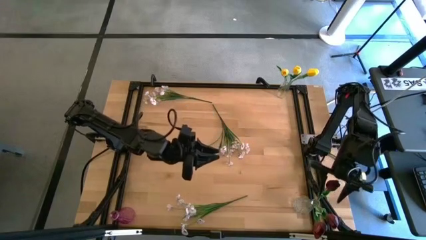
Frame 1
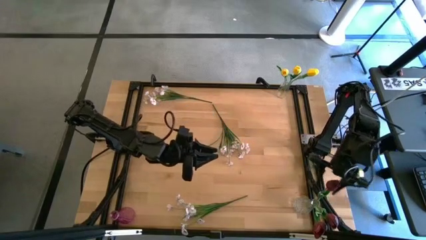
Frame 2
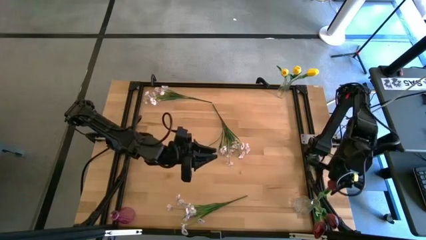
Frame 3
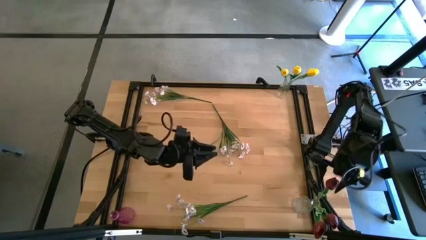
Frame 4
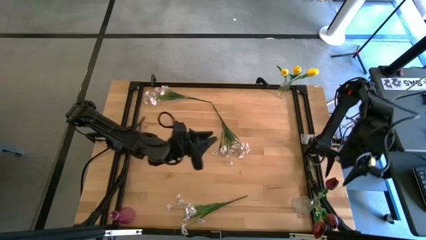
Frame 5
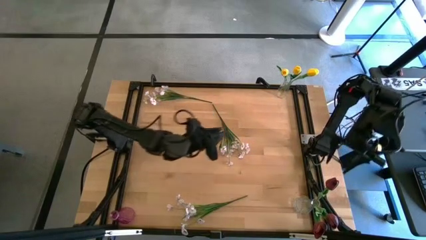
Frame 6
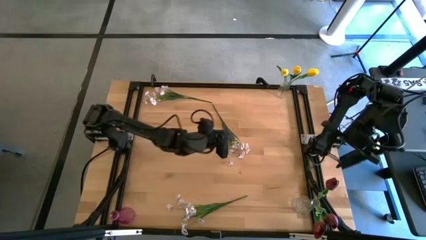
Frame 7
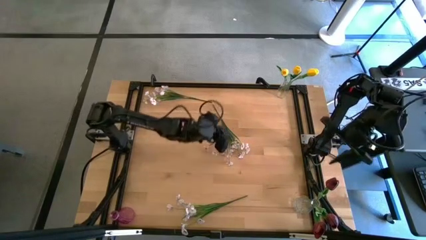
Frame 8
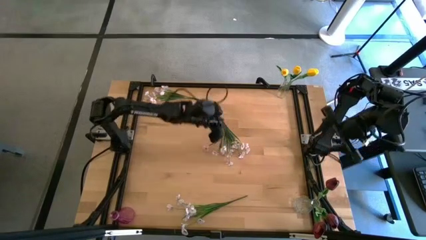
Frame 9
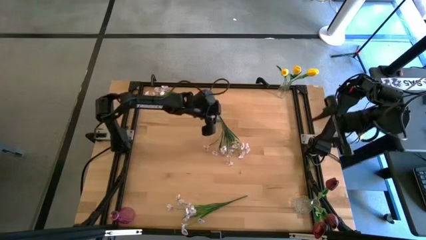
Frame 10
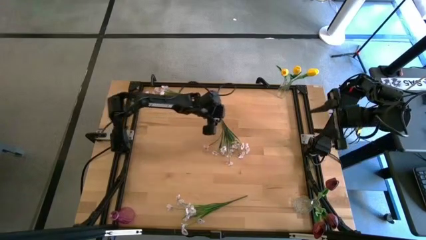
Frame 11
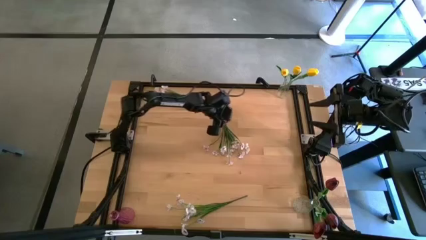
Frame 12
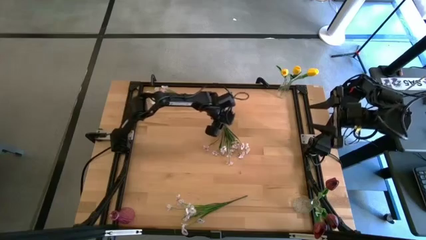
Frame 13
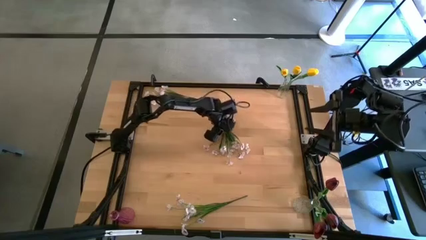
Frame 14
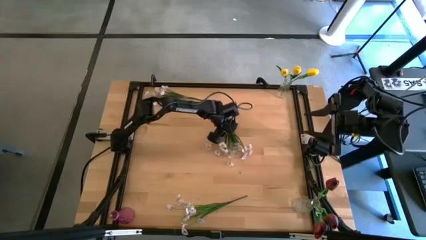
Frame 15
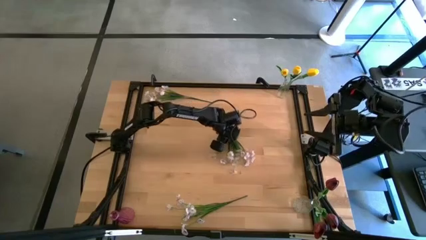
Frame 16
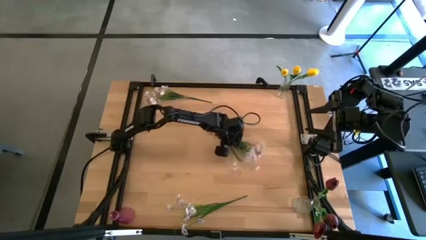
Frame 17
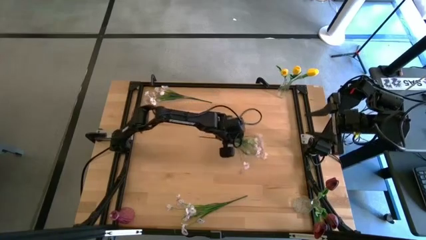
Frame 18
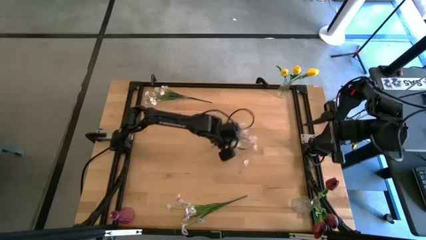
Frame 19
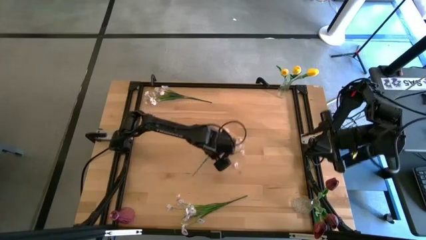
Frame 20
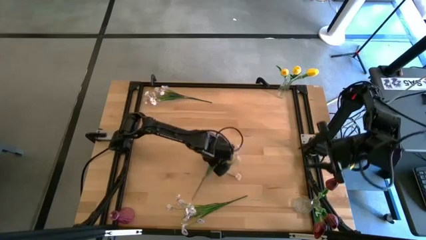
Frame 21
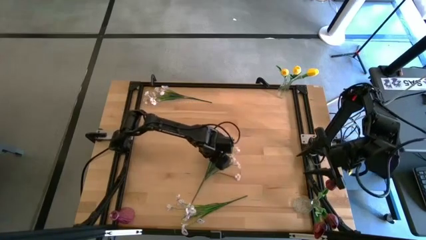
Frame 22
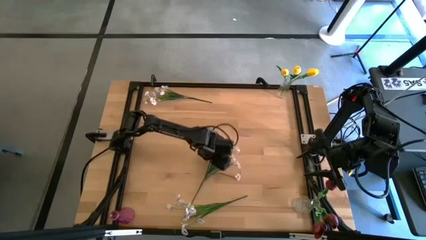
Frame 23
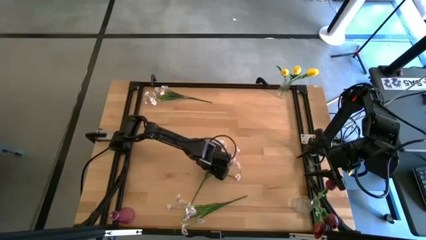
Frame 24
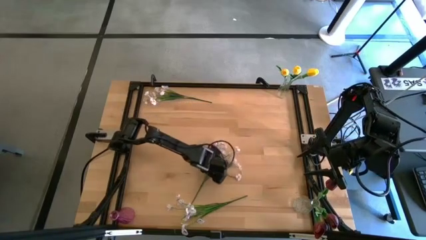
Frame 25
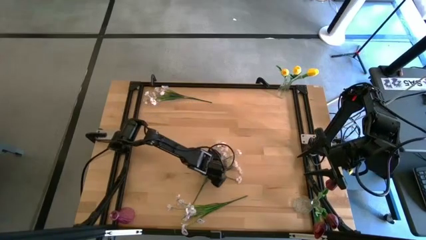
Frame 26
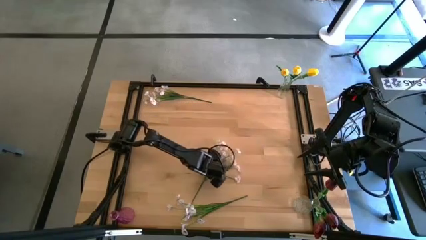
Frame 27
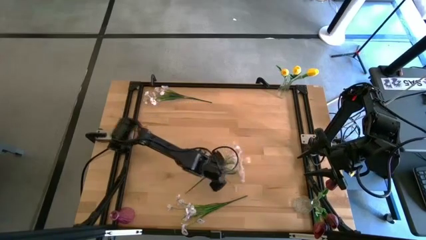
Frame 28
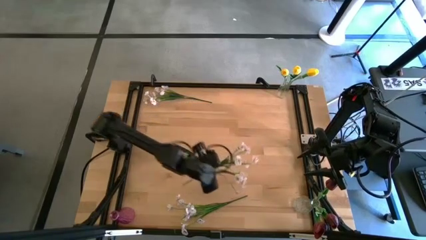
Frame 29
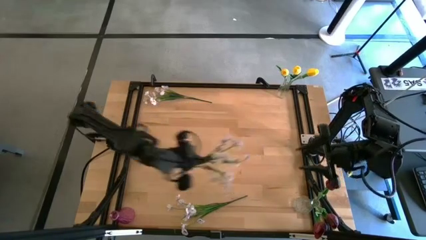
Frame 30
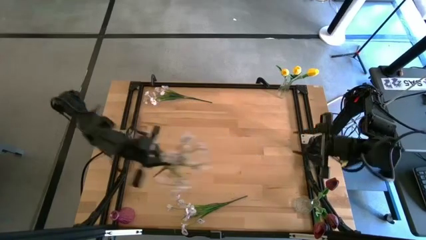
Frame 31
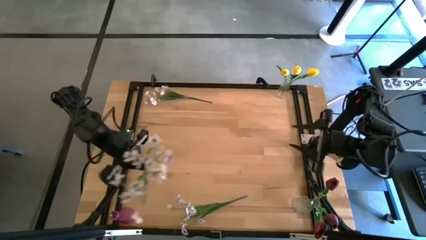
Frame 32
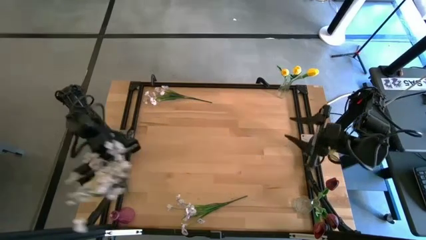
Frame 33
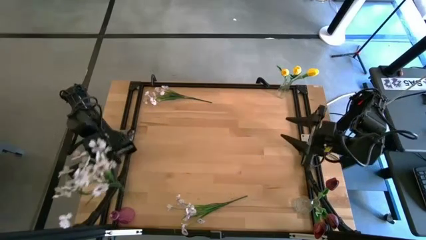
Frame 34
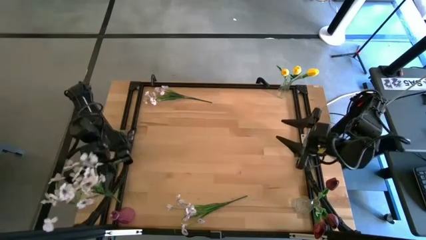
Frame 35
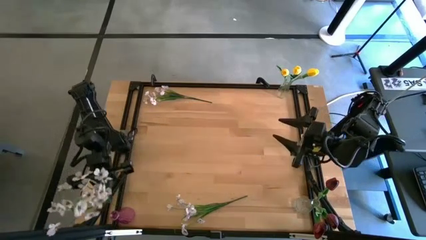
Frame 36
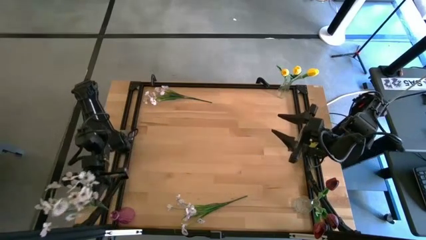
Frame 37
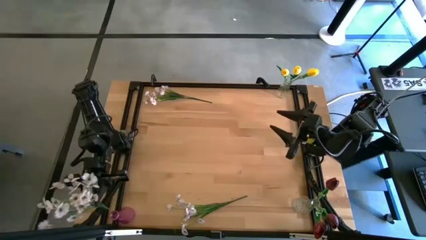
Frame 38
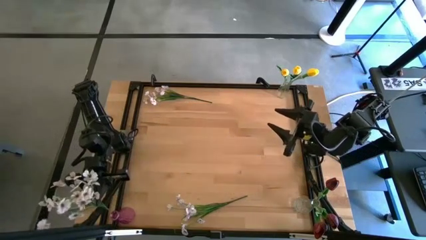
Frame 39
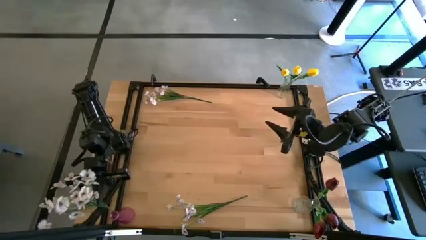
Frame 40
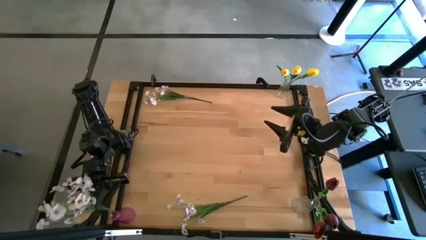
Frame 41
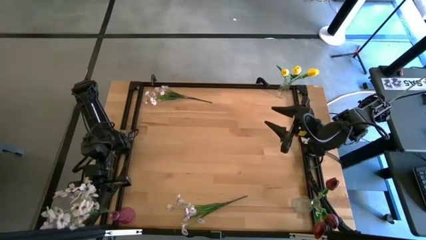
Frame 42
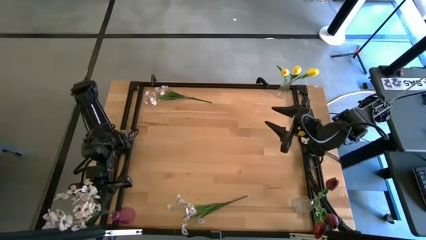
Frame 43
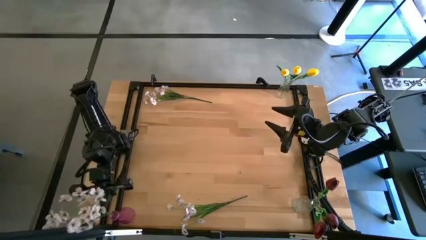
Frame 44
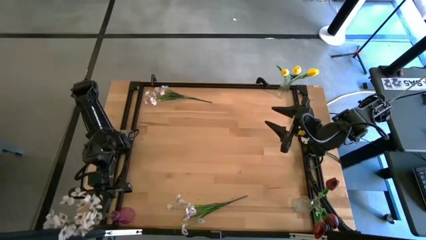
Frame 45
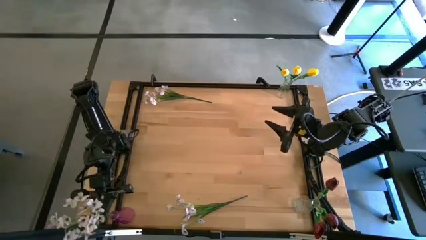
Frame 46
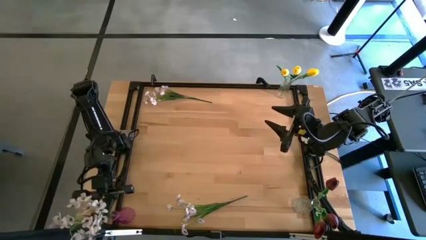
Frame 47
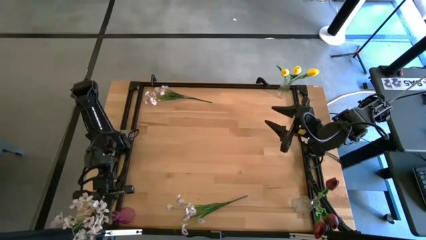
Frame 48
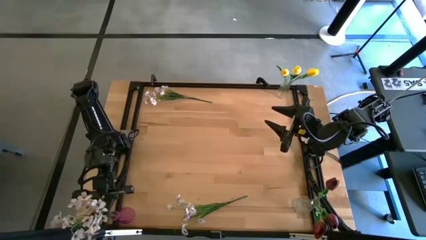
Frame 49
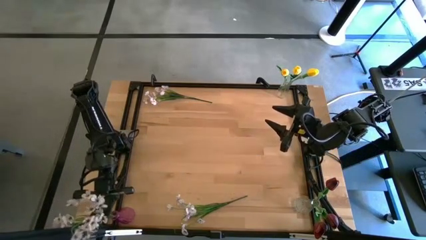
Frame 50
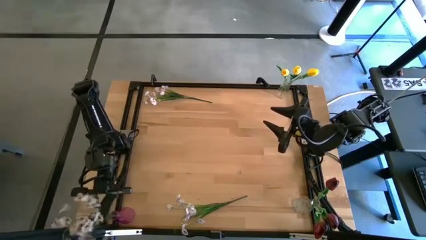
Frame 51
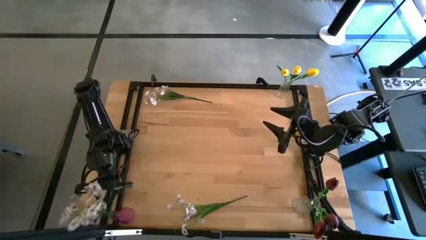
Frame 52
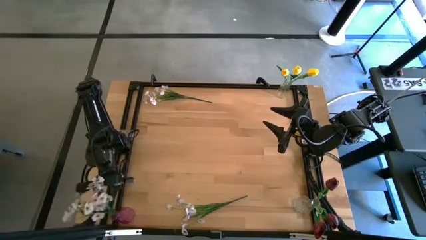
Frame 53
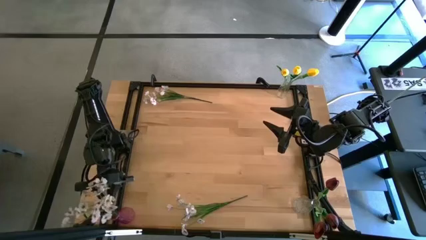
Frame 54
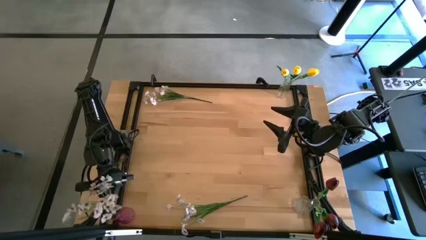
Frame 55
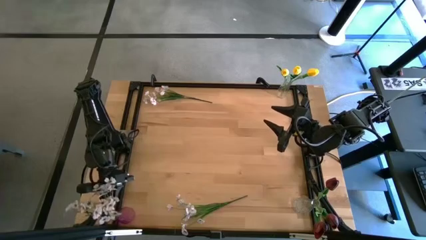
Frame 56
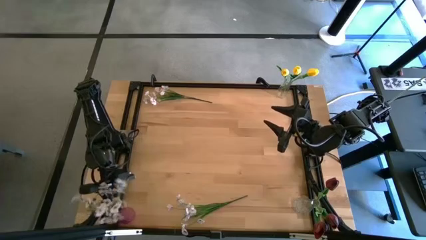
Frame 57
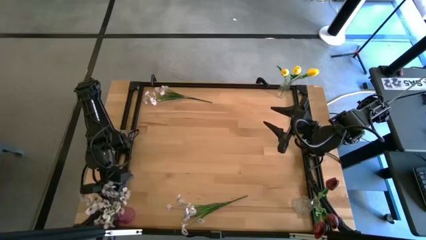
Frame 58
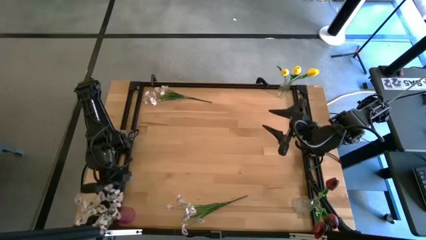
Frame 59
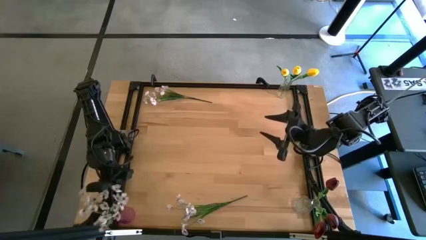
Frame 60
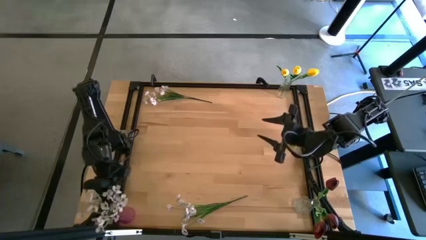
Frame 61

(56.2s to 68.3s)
Task: Sort flowers into vase by color
Put the center white flowers into the pink crystal vase
